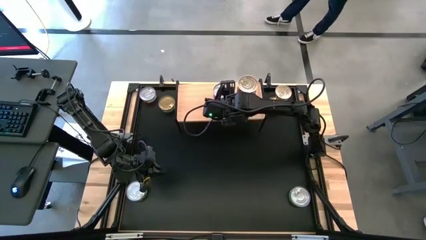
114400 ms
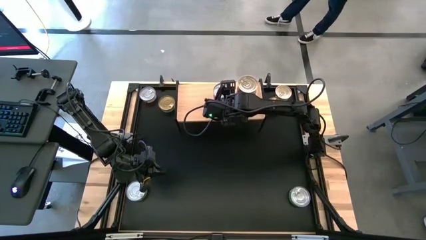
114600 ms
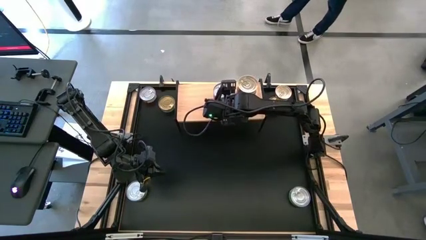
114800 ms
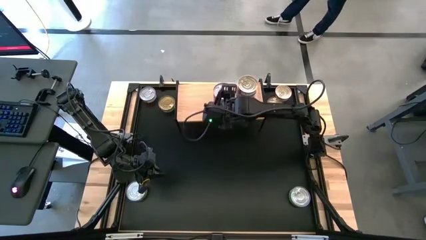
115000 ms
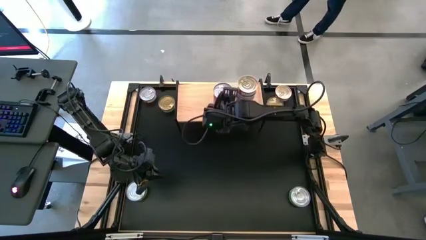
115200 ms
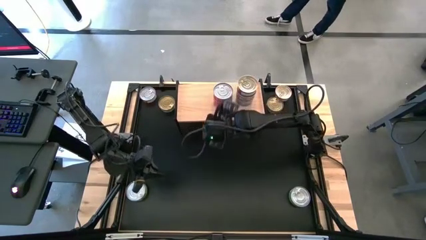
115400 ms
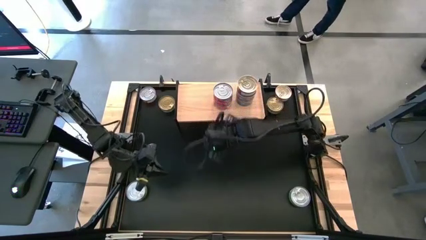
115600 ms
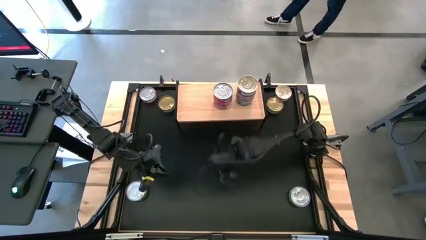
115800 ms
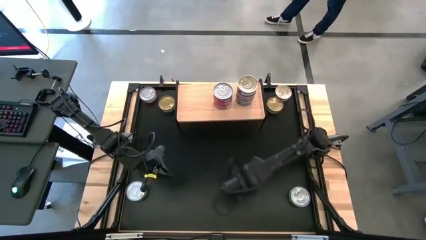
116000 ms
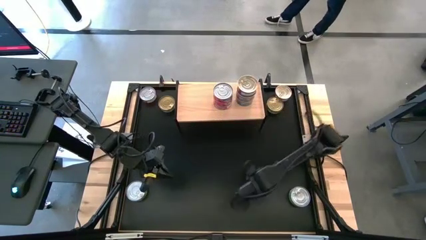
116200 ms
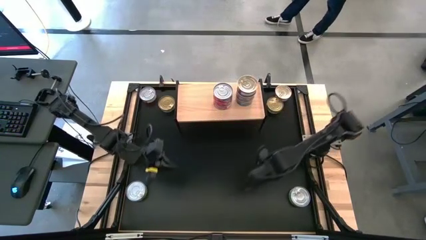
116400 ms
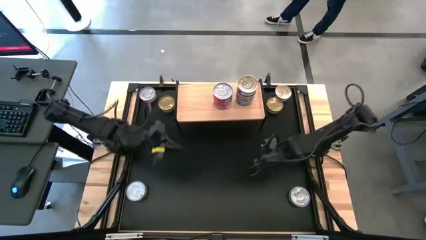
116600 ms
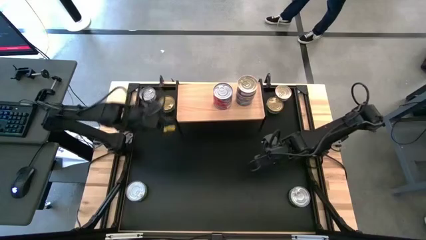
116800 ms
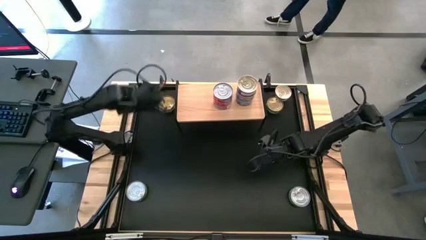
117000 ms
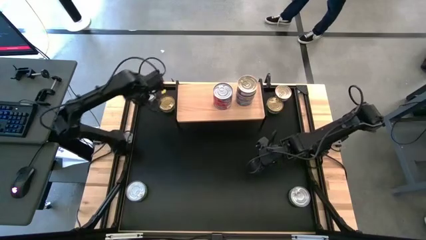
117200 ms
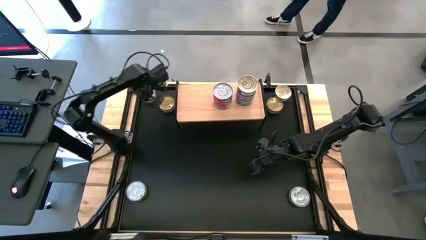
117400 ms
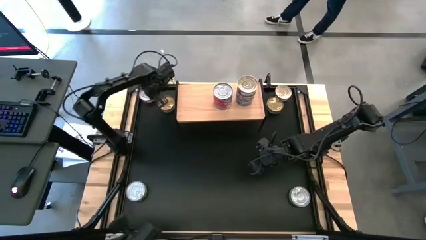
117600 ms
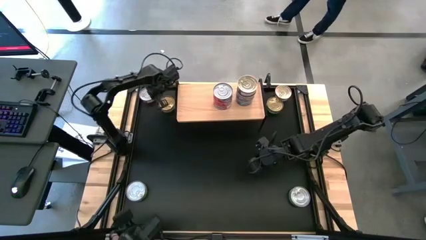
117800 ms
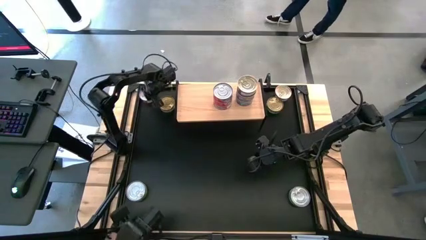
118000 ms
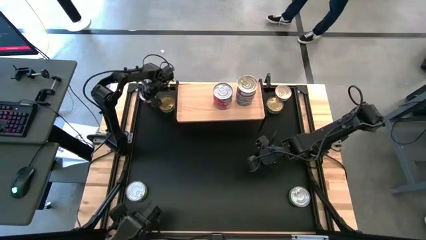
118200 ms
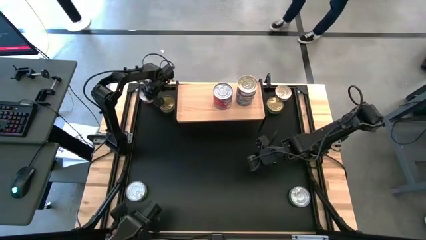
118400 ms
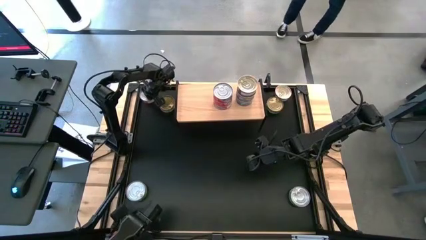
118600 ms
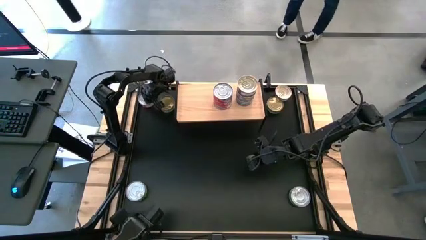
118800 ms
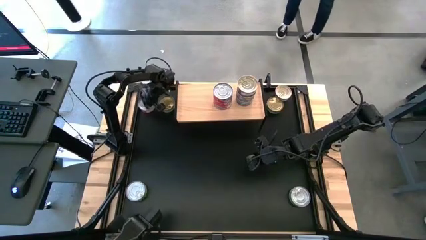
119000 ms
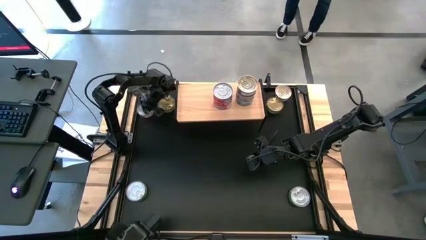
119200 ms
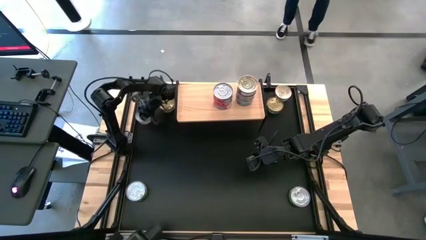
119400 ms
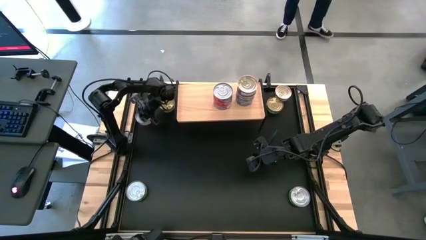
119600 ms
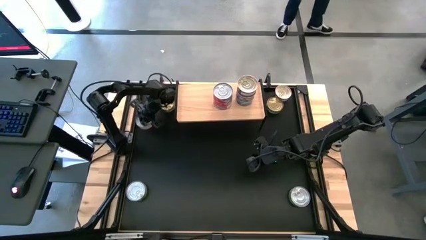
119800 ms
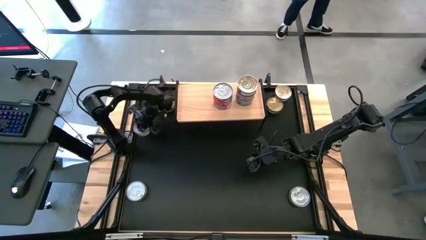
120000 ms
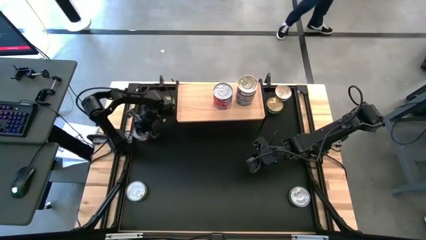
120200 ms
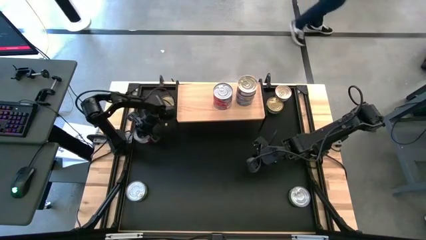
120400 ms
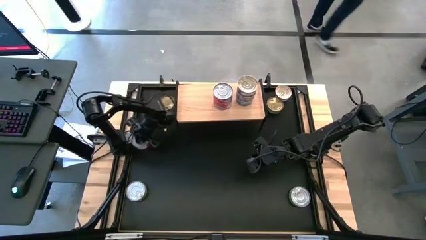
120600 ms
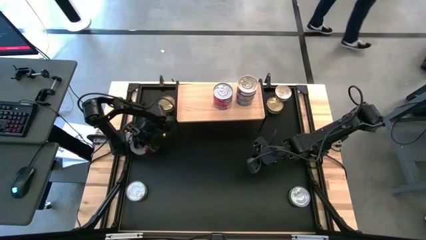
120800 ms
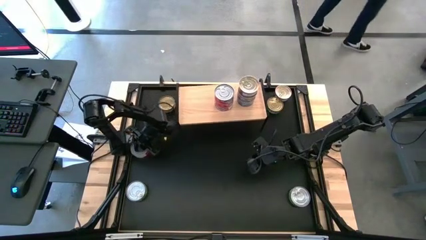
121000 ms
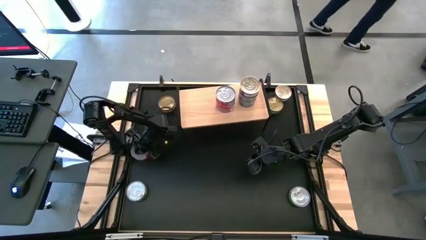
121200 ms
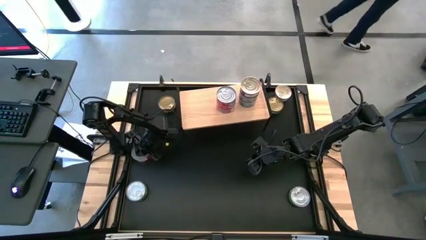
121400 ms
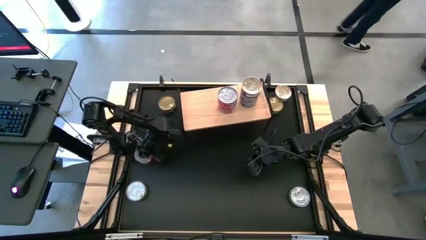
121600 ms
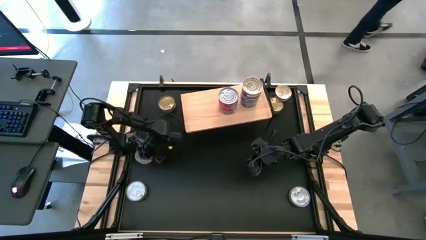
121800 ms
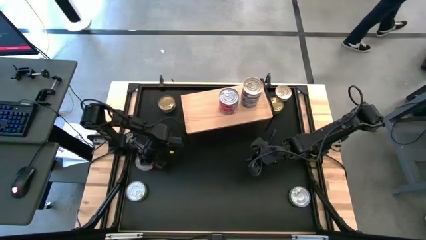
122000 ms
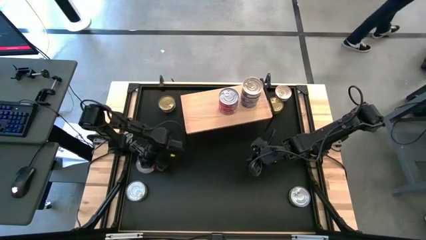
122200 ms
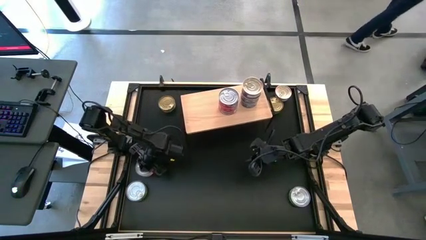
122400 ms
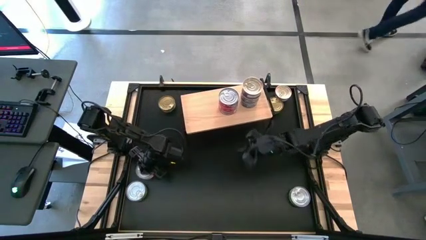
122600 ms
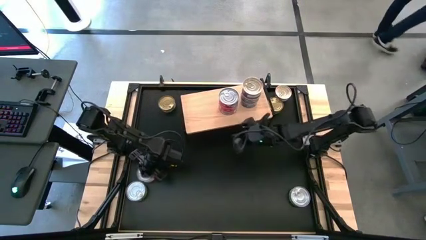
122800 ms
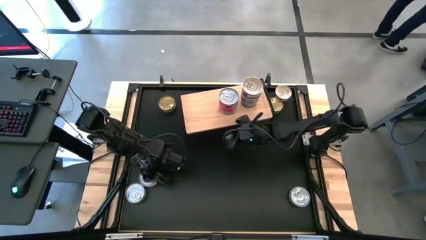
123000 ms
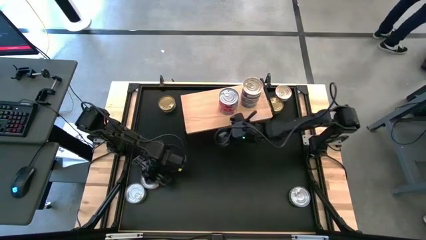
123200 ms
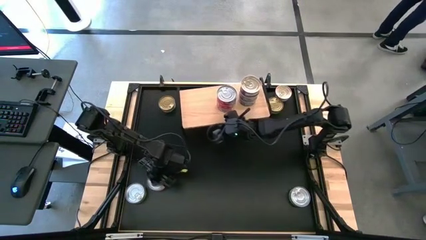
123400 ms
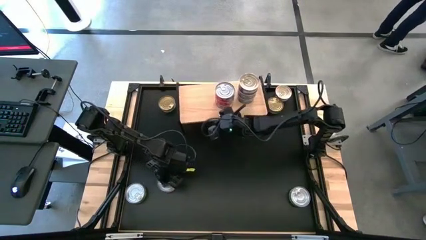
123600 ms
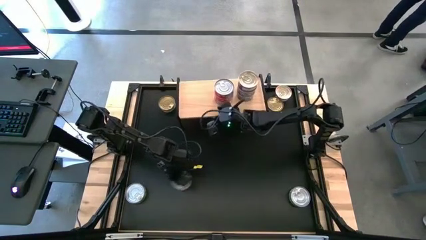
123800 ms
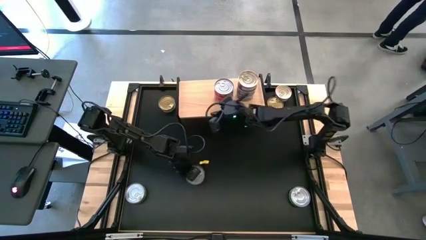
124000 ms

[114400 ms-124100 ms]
Task: Stack canned seafood by type on shelf
Stack the red tuna can on top of the red tuna can on the shelf

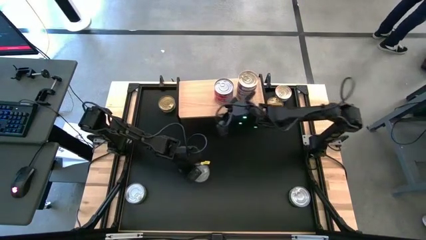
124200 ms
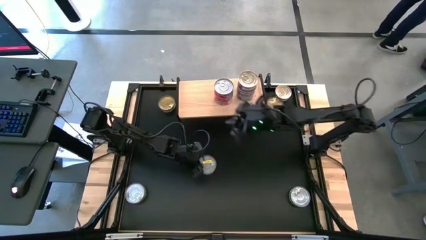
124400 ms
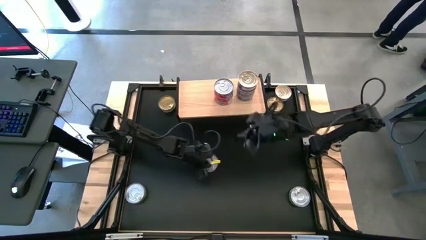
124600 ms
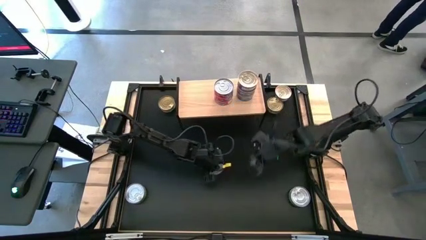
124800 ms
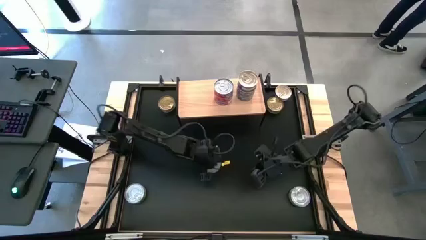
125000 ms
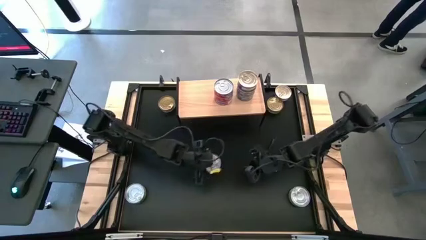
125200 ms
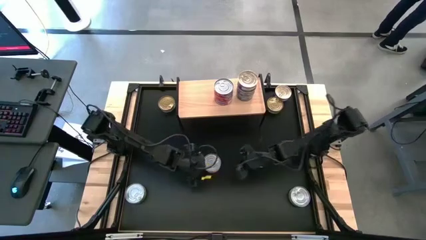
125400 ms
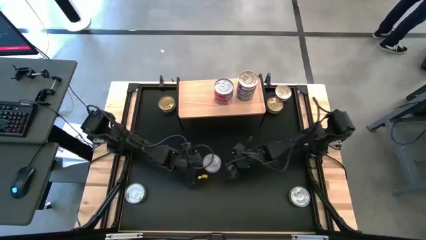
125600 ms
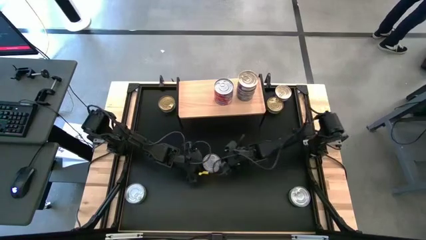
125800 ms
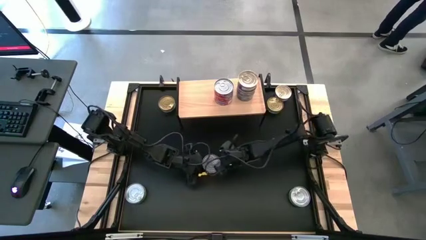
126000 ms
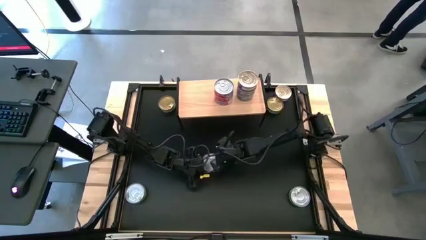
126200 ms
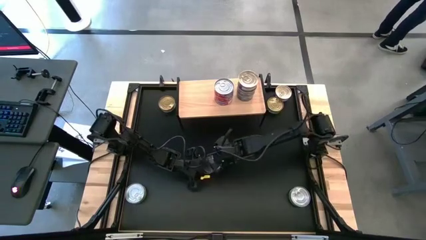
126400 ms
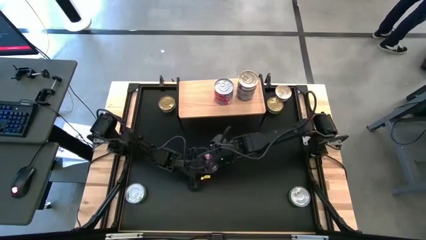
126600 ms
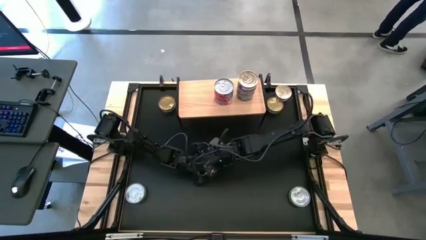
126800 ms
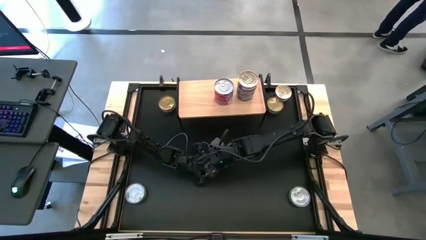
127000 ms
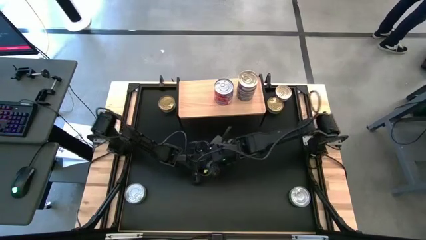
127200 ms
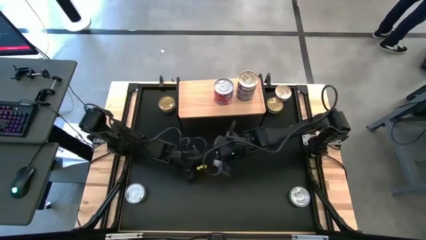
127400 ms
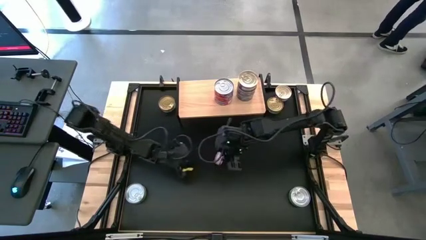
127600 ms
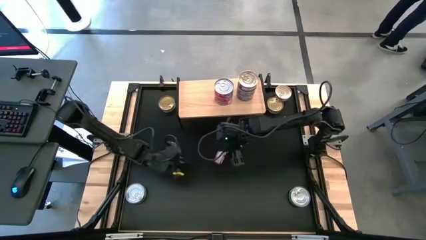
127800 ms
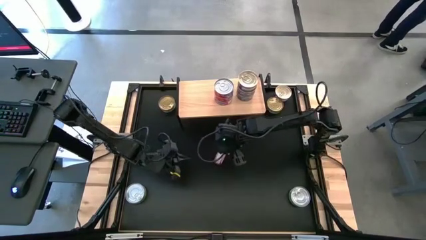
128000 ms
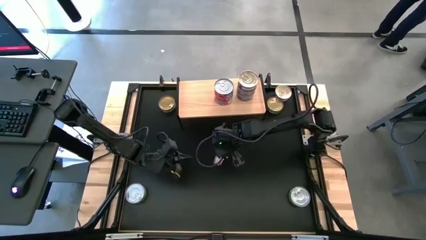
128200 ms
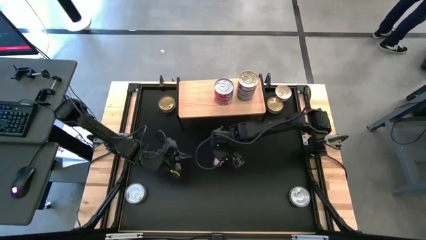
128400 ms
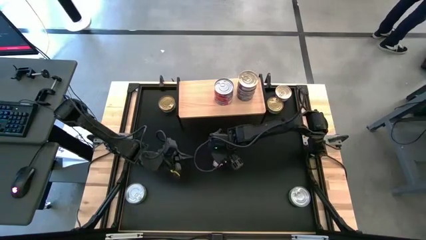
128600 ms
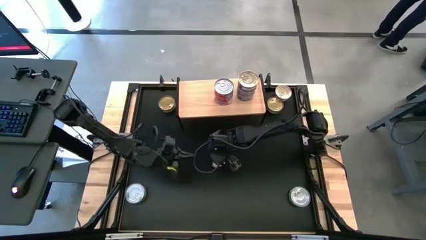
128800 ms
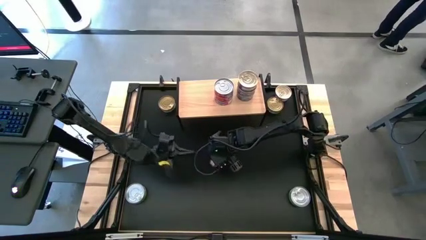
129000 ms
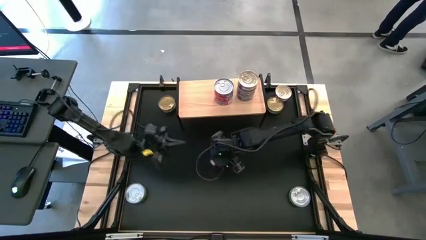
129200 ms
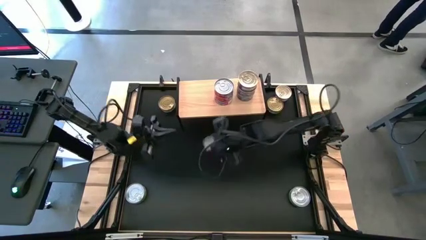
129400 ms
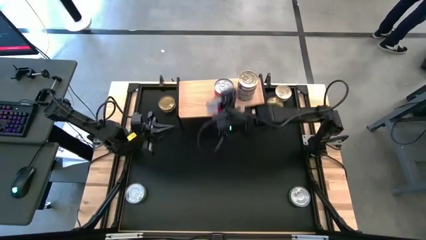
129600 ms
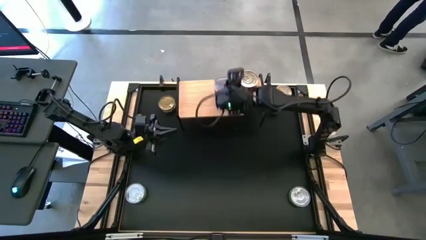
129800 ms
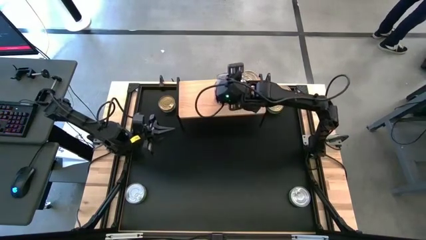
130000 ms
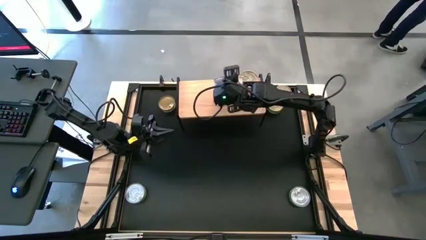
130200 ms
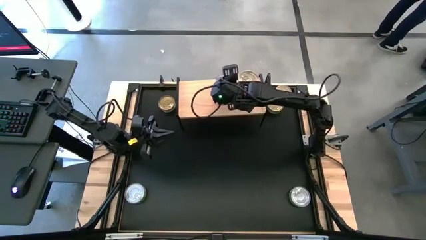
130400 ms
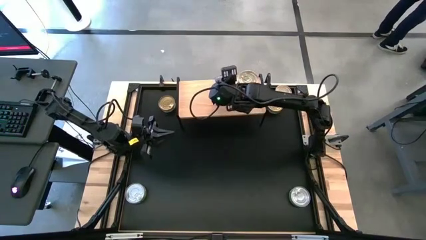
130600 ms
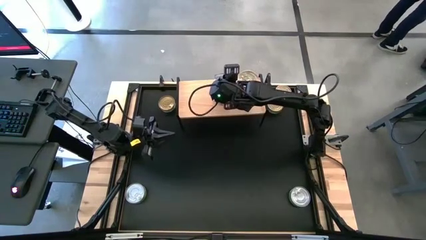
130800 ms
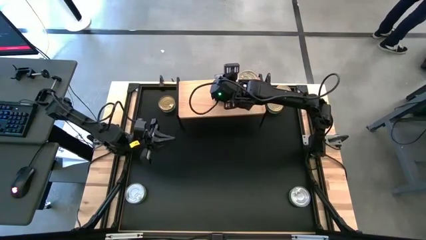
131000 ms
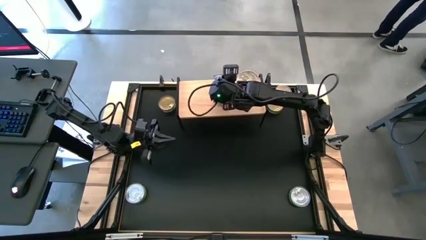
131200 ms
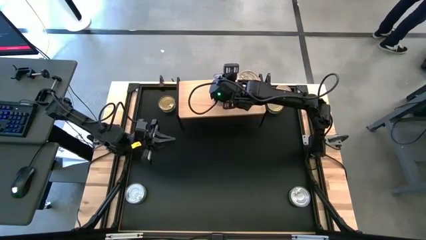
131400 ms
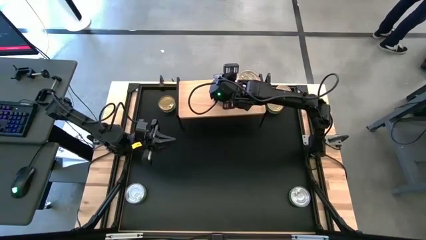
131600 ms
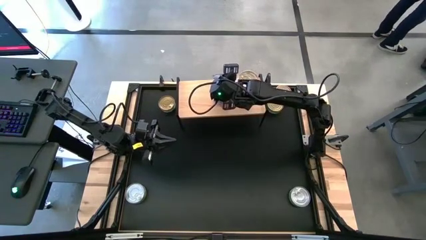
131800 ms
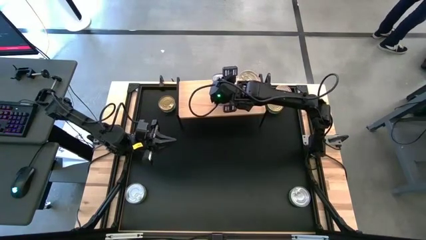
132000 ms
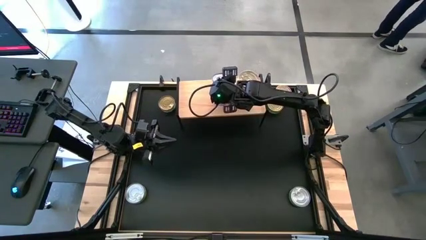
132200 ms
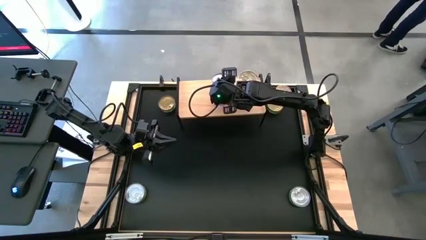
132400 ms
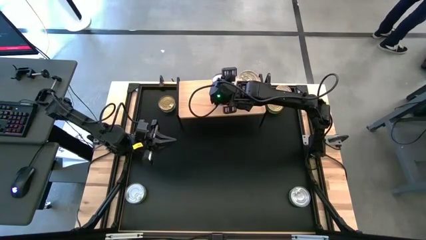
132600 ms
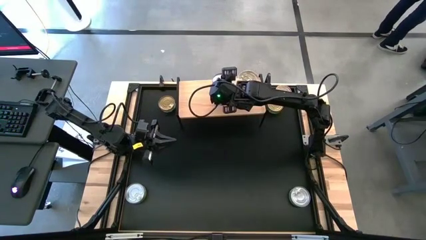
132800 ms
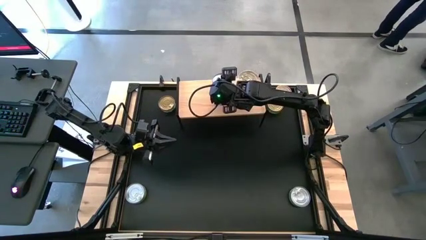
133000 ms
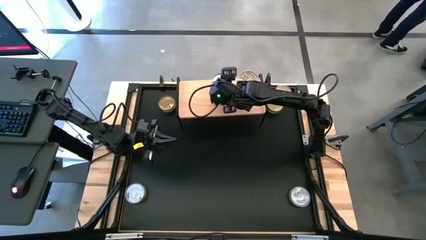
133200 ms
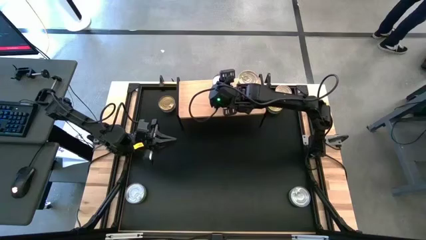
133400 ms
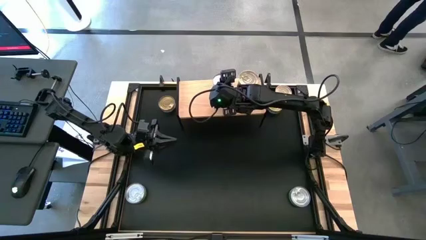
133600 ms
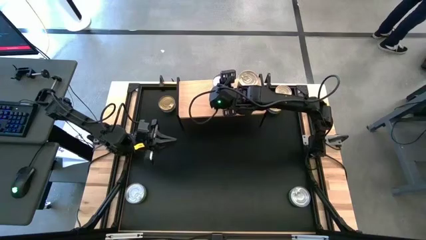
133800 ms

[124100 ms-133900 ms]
Stack the red tuna can on top of the red tuna can on the shelf
